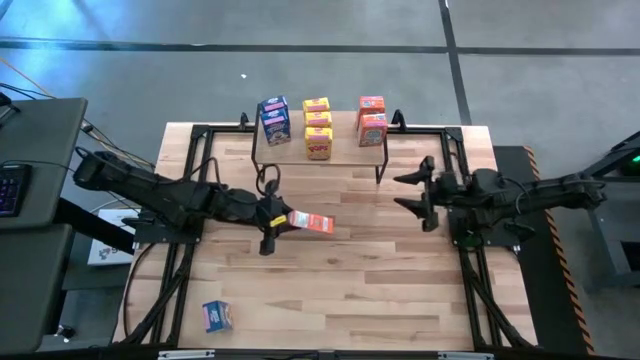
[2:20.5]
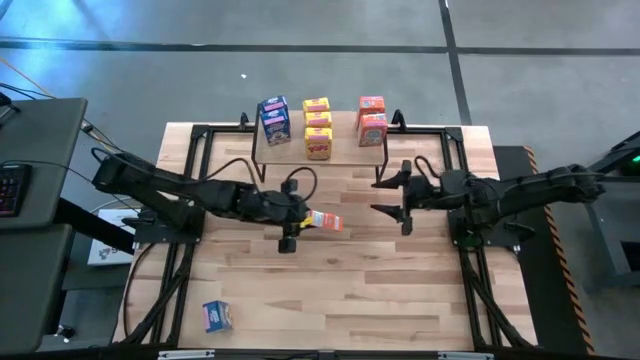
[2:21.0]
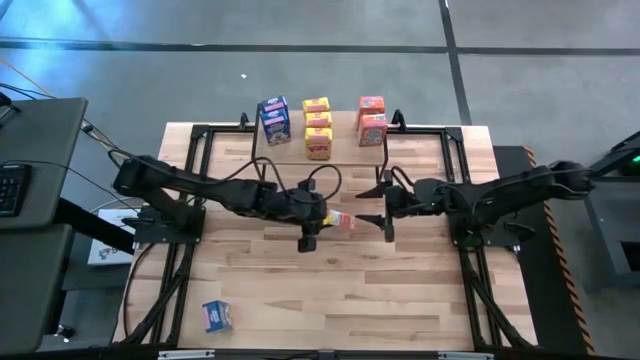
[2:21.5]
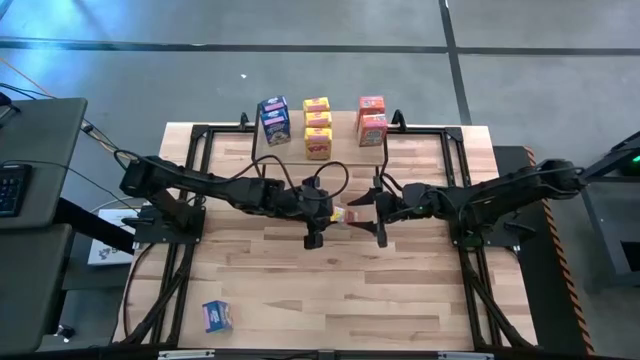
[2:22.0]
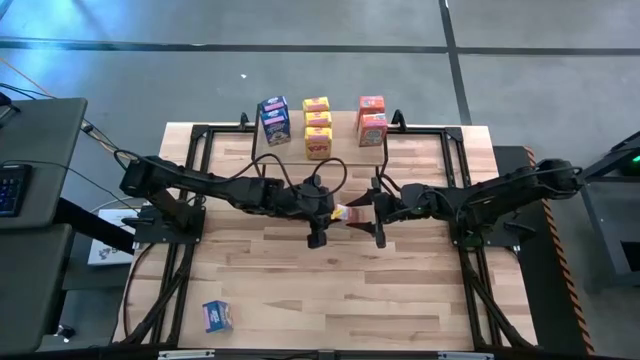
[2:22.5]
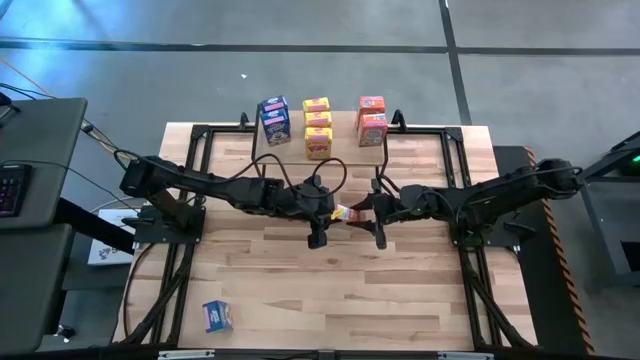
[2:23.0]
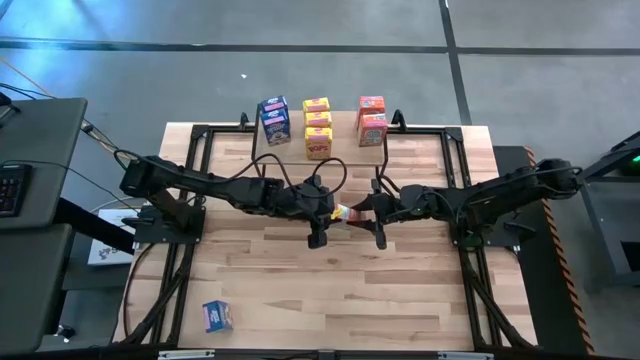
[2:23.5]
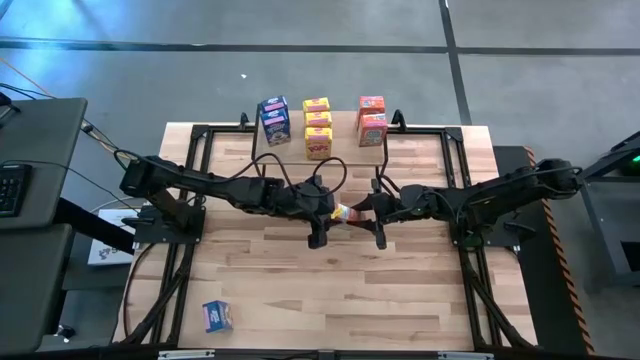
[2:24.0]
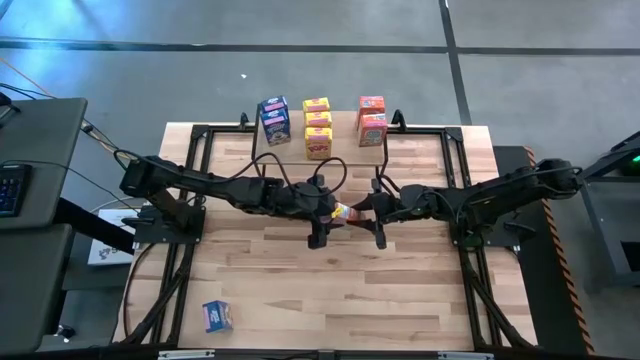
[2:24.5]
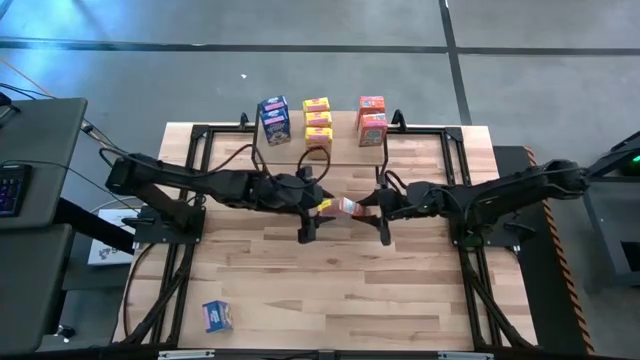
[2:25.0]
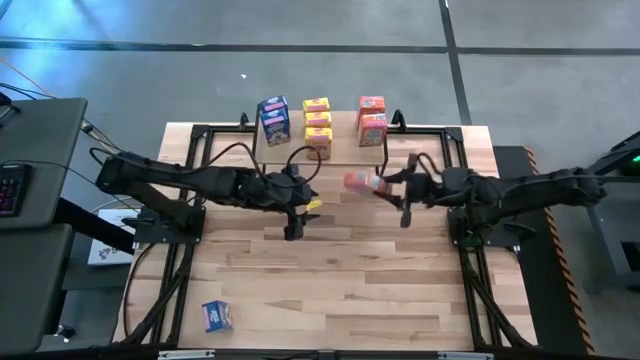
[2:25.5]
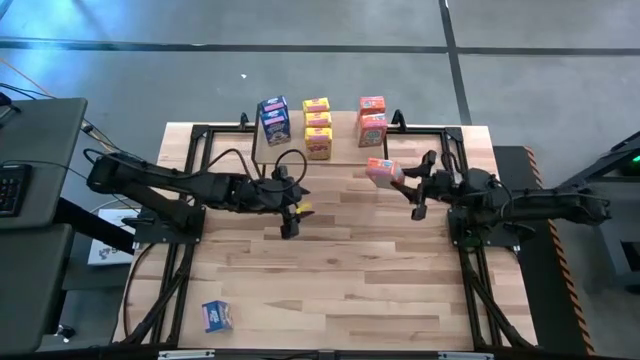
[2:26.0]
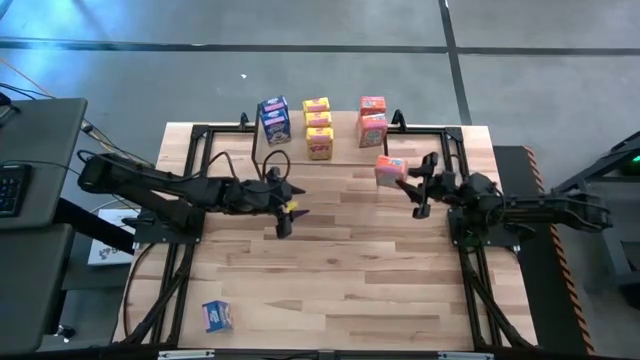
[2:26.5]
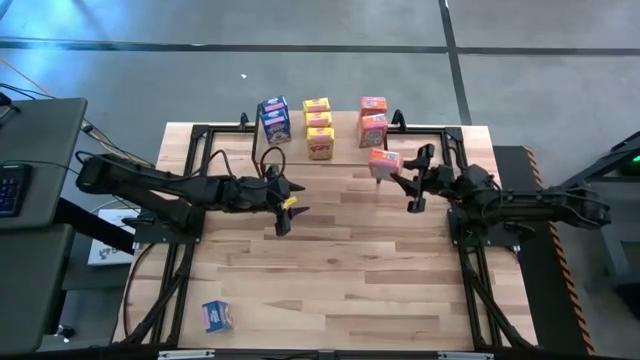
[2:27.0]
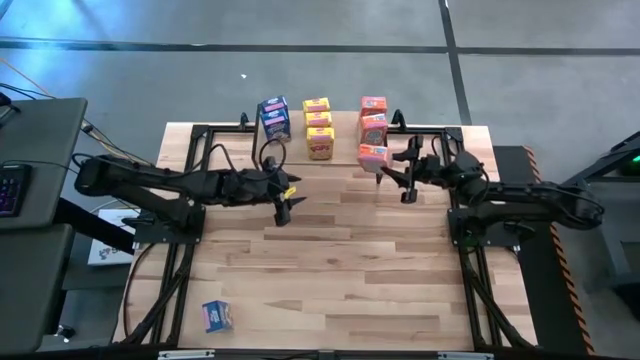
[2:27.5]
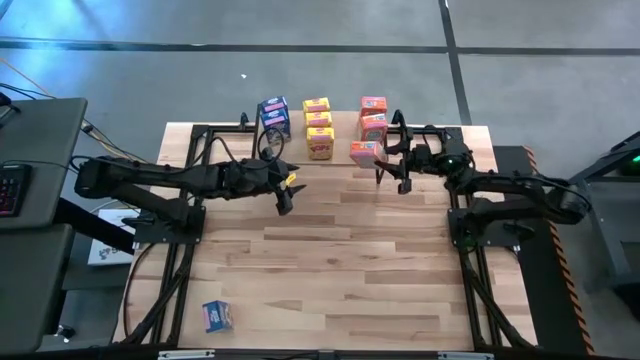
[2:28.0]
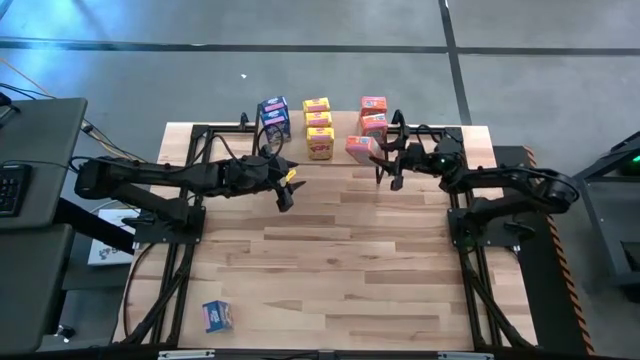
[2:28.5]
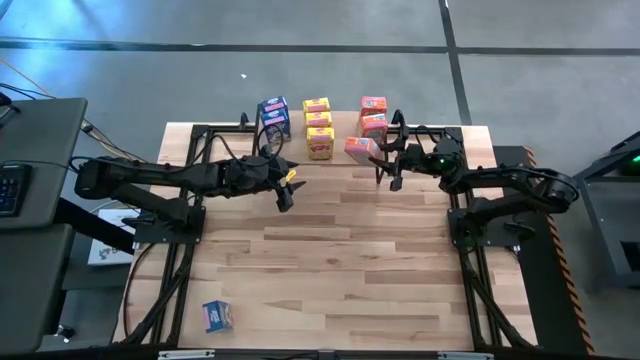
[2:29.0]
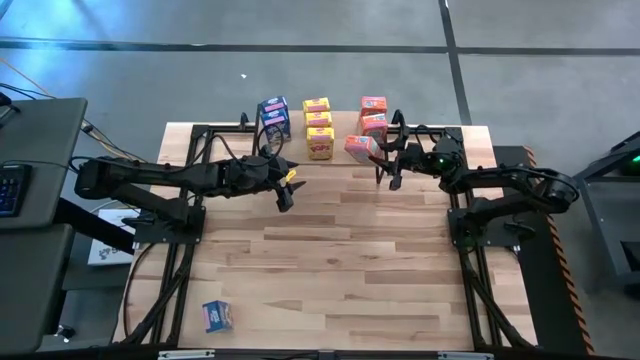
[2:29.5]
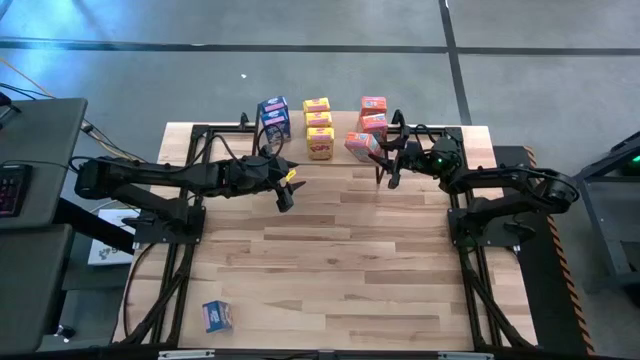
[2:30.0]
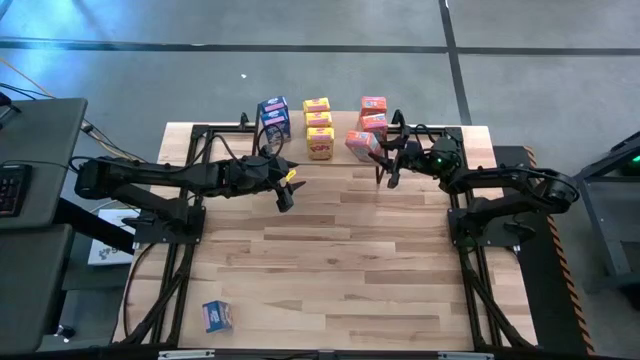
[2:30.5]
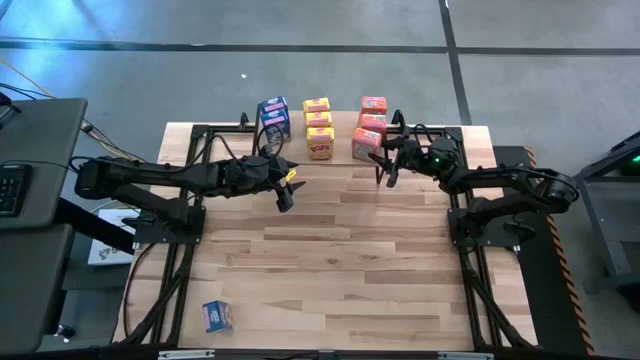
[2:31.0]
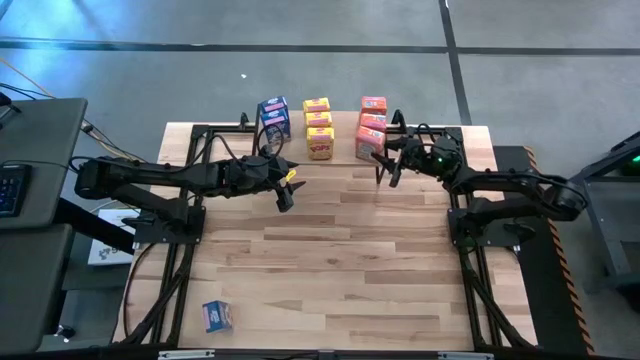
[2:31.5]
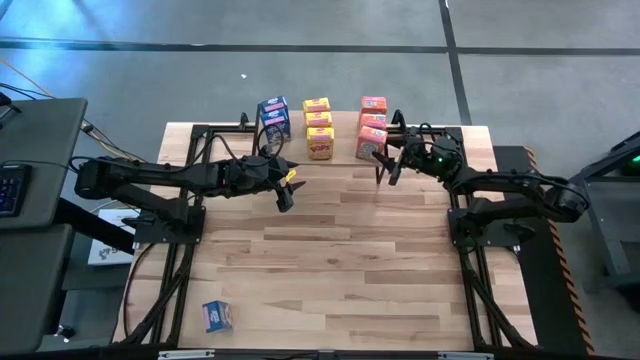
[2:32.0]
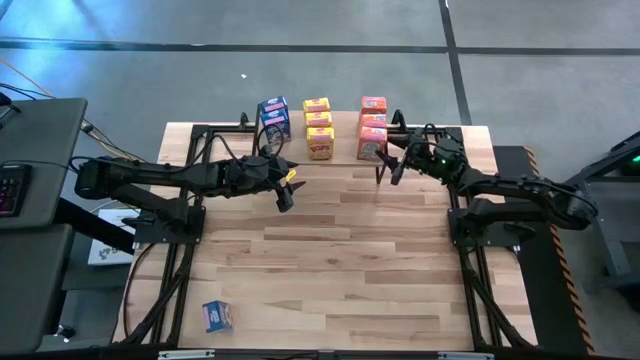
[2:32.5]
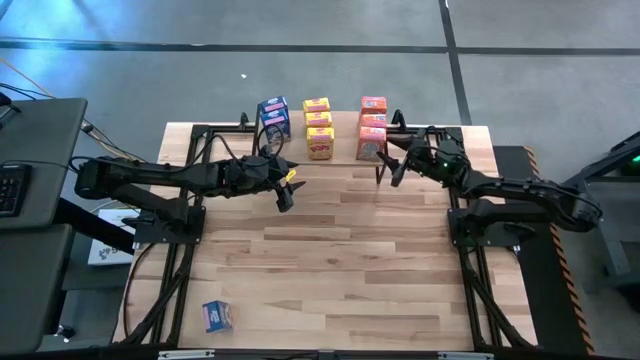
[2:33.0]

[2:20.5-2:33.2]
Task: Stack cereal on shelf
Put the orange cereal box and aligned with the other orange cereal boxes on the shelf

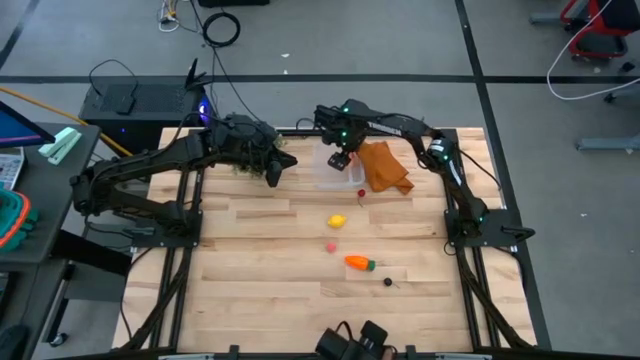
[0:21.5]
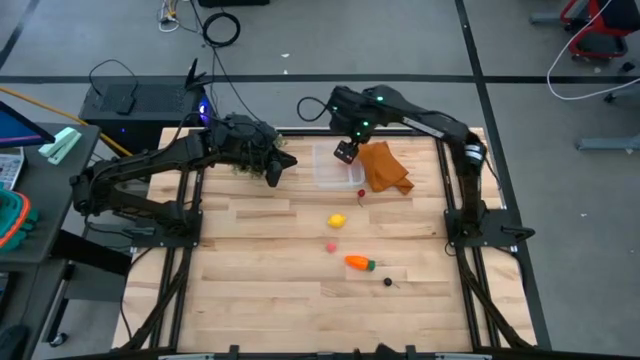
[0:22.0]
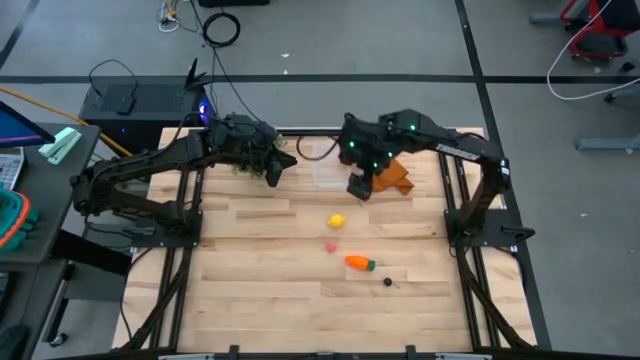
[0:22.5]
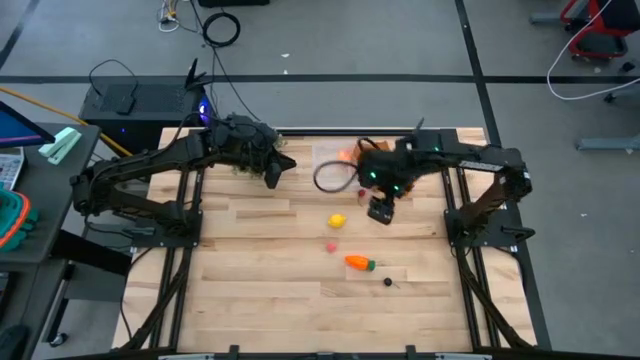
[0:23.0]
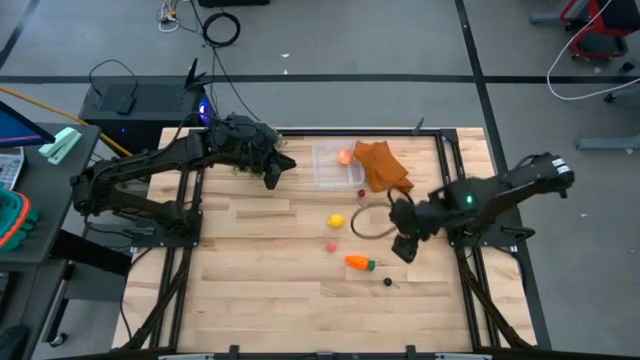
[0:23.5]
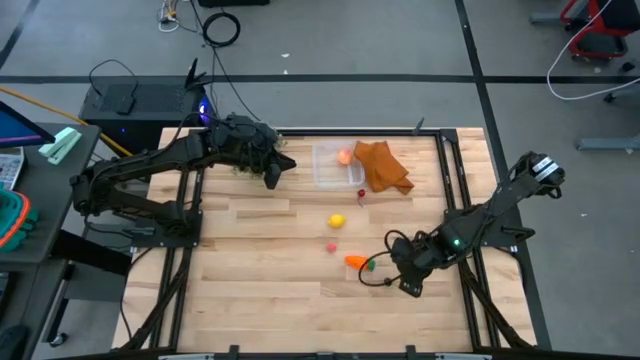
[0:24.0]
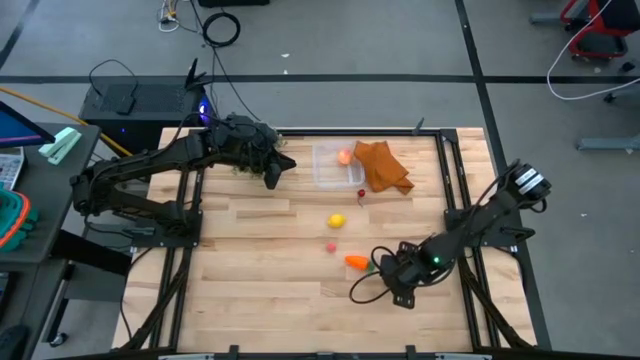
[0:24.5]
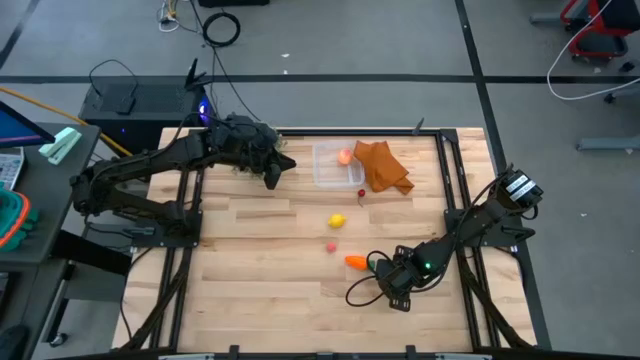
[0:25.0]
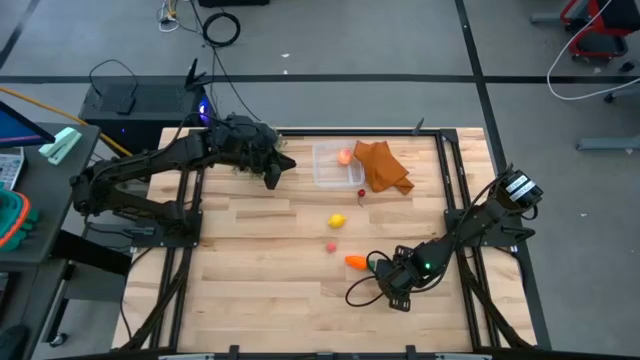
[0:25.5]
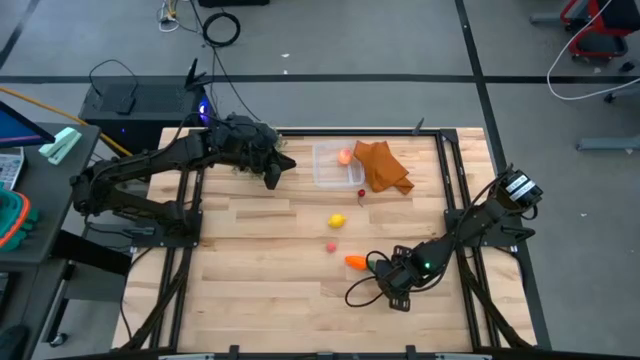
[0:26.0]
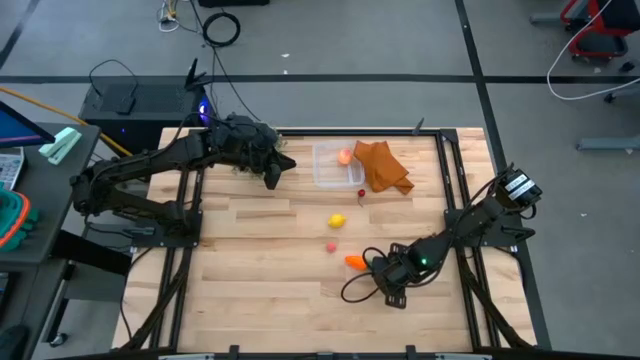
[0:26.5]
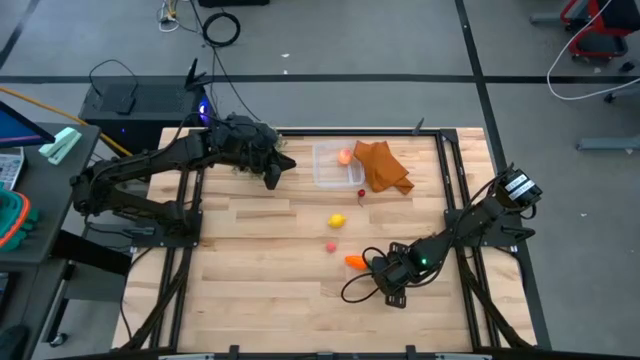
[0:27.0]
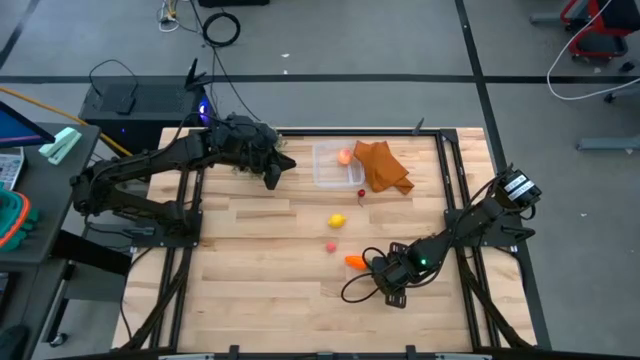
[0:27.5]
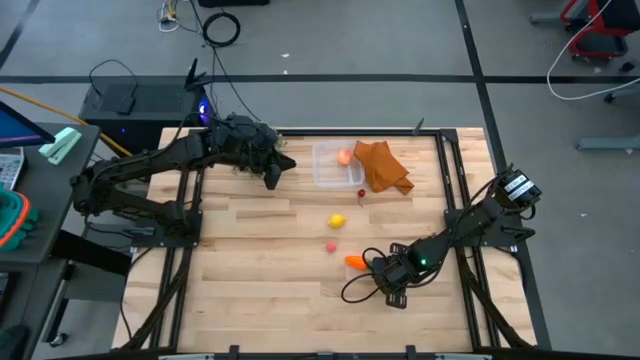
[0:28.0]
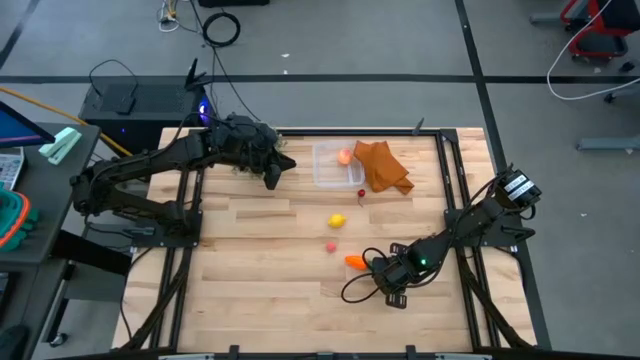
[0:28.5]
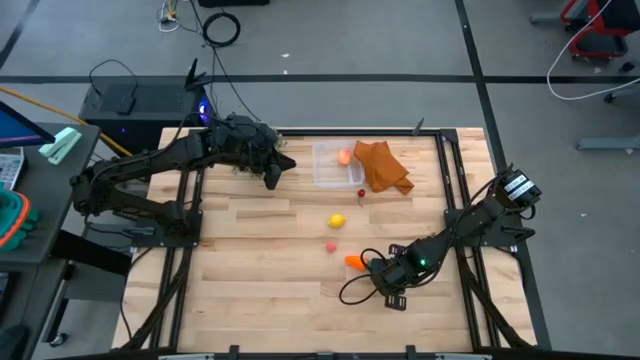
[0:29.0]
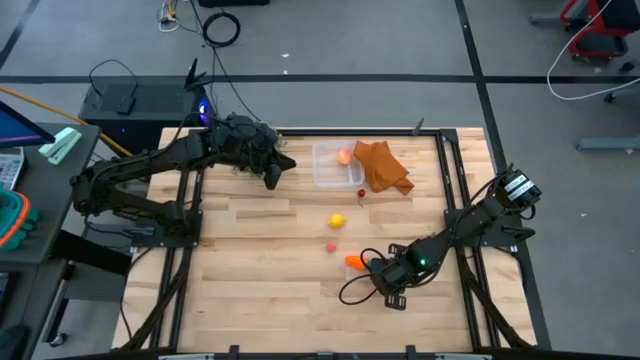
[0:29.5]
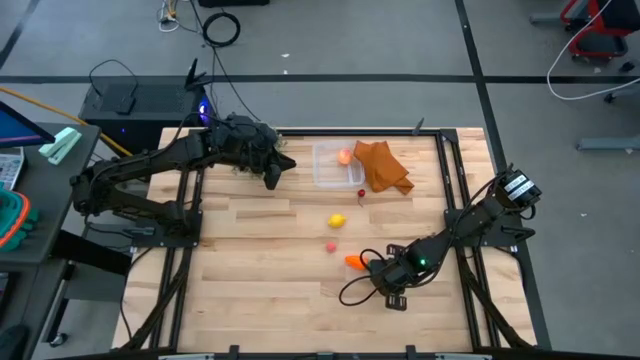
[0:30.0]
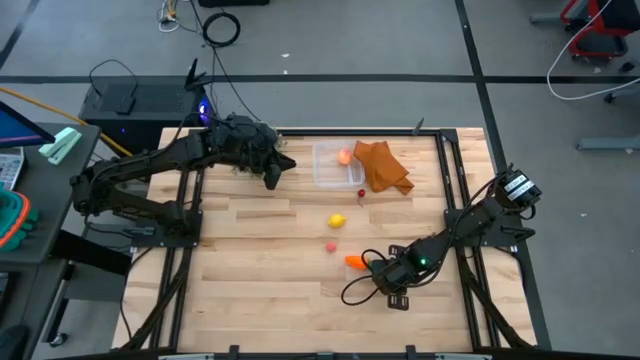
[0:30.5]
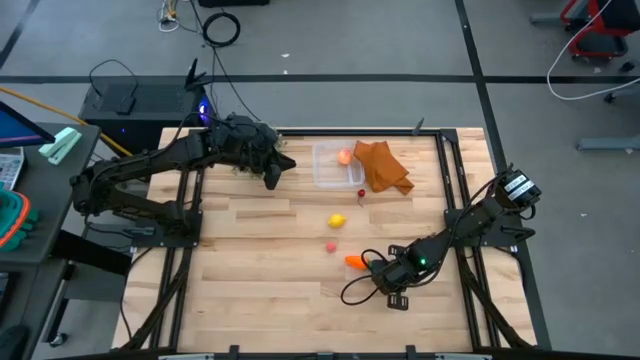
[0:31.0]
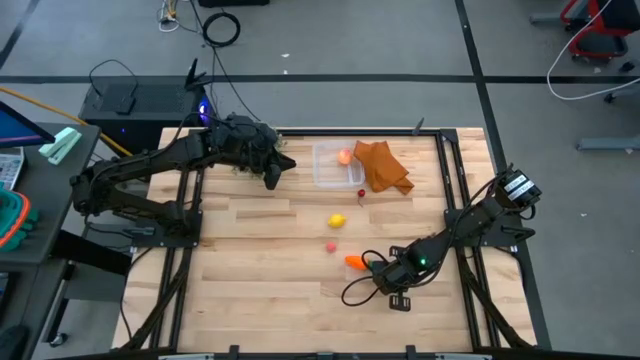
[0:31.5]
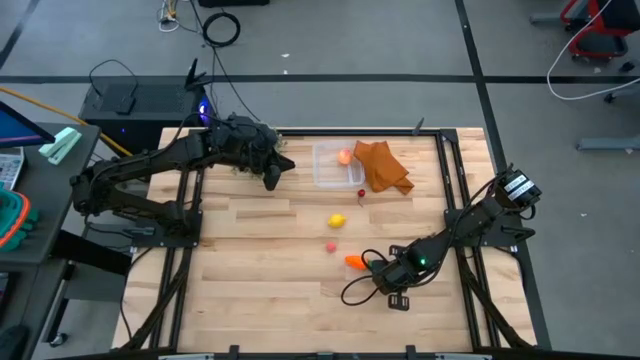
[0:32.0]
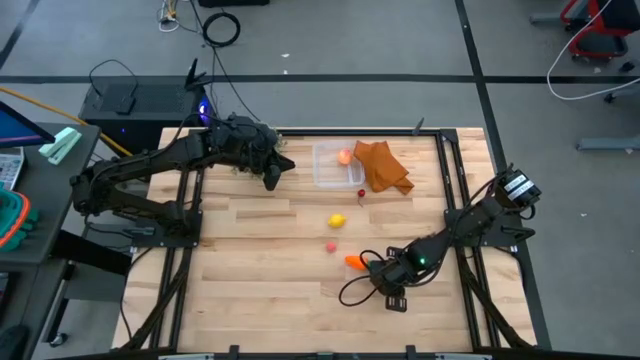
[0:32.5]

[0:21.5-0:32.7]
Task: Pick and placing Produce into tupperware
Put the black cherry into the transparent bin
